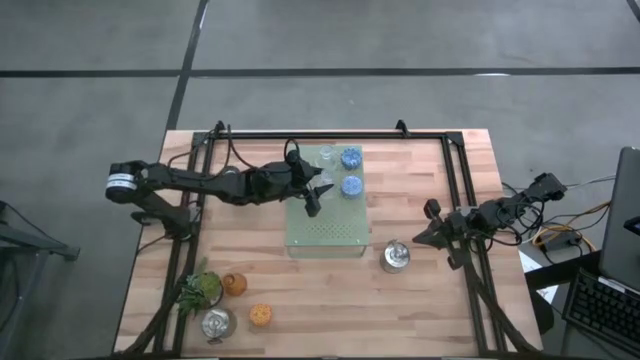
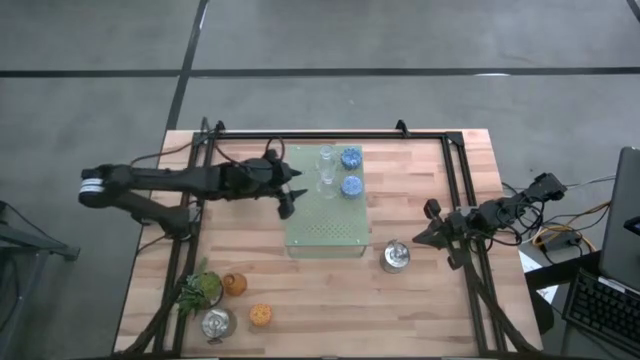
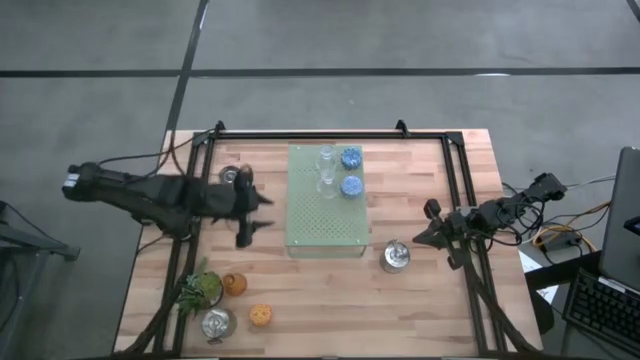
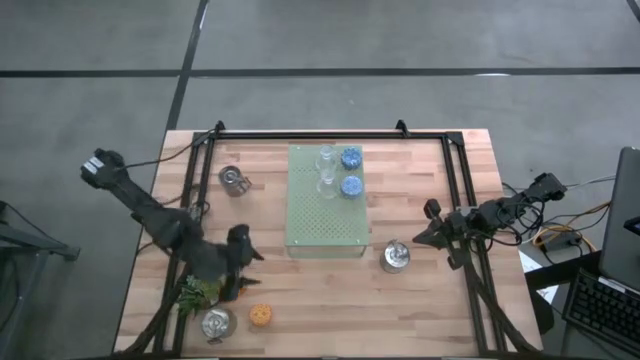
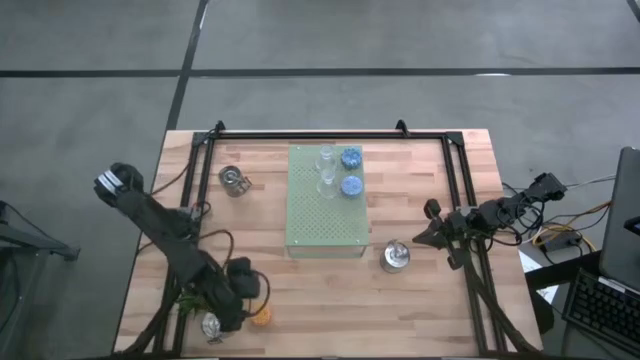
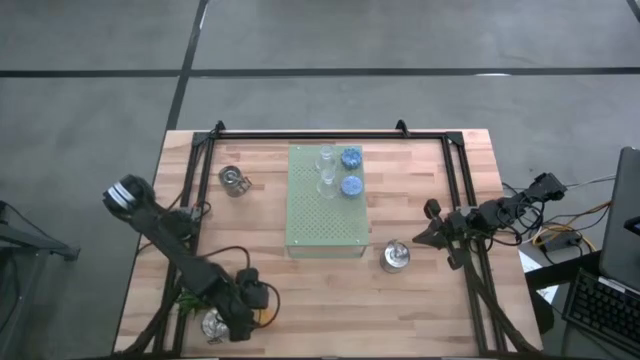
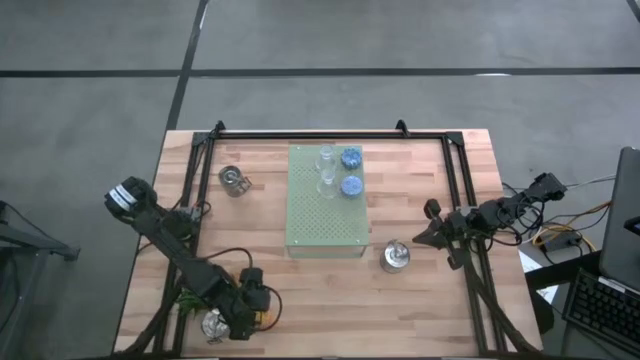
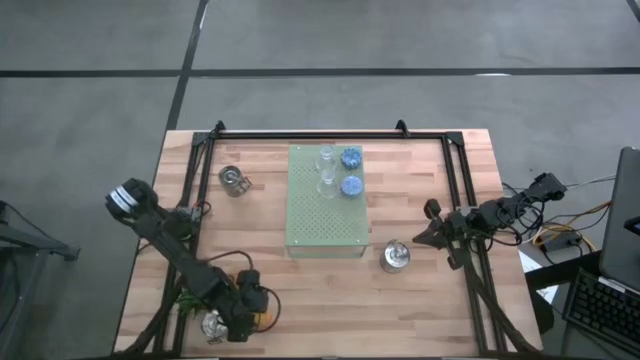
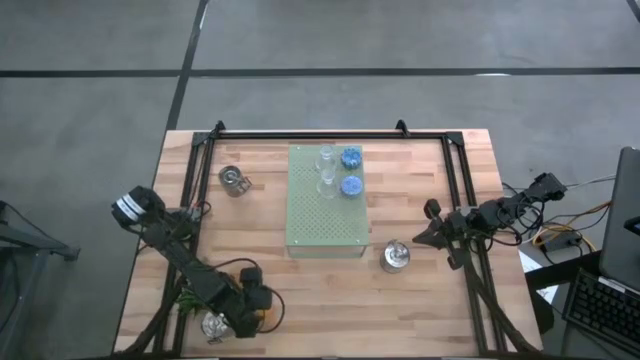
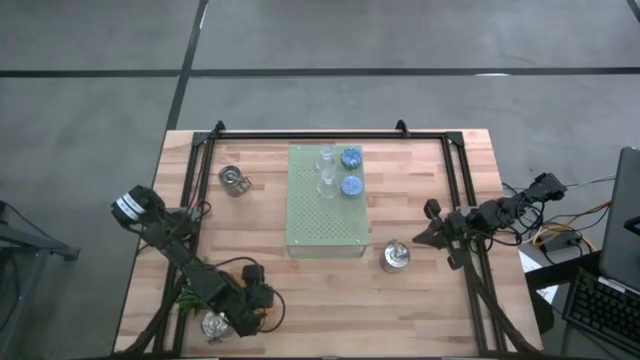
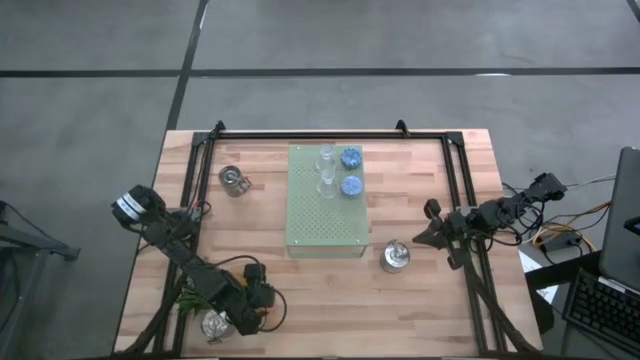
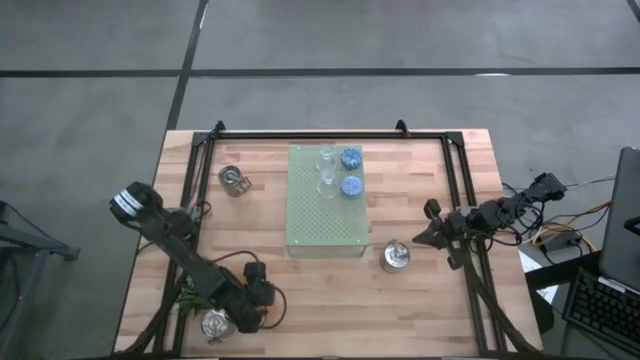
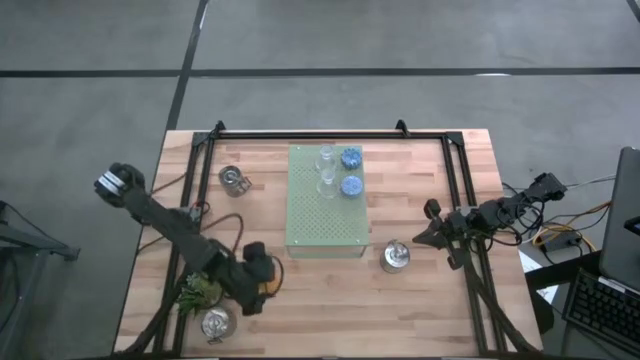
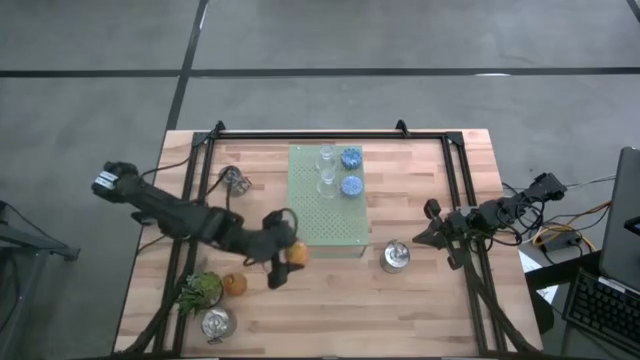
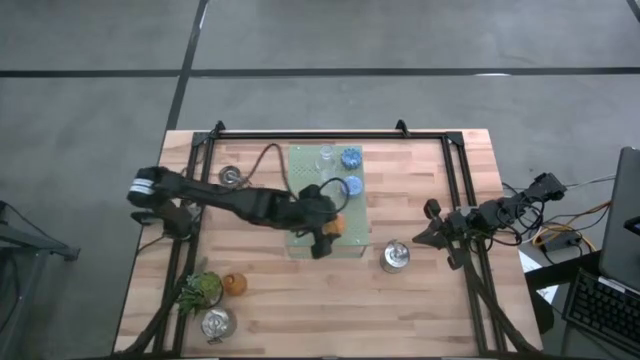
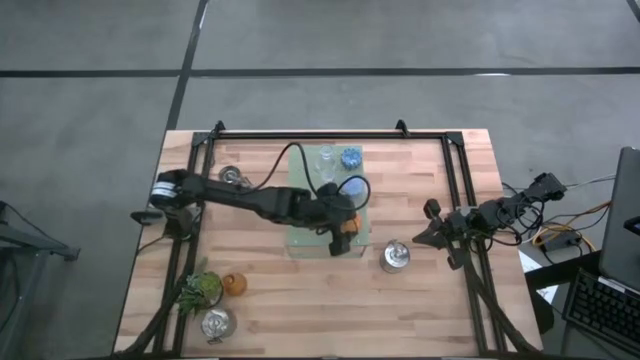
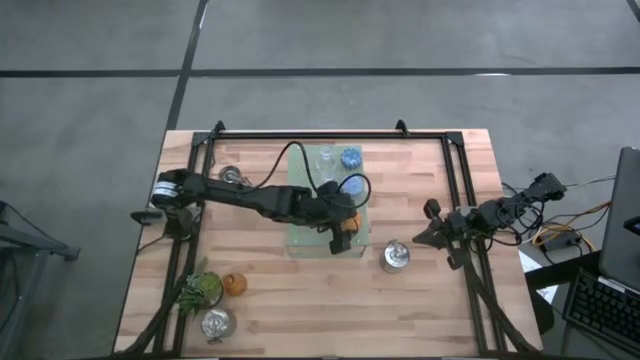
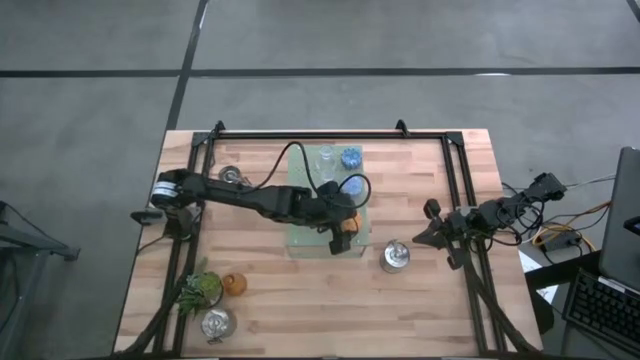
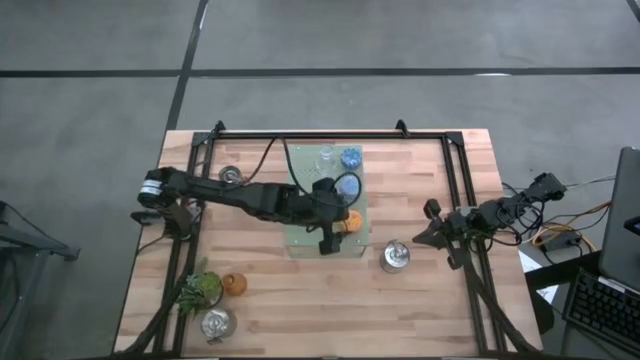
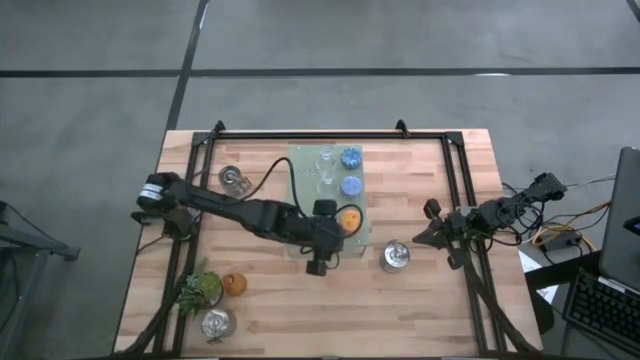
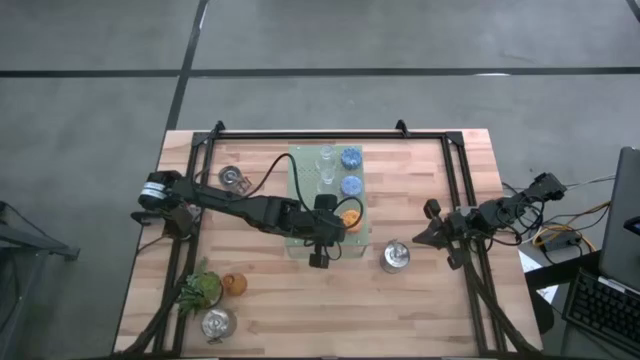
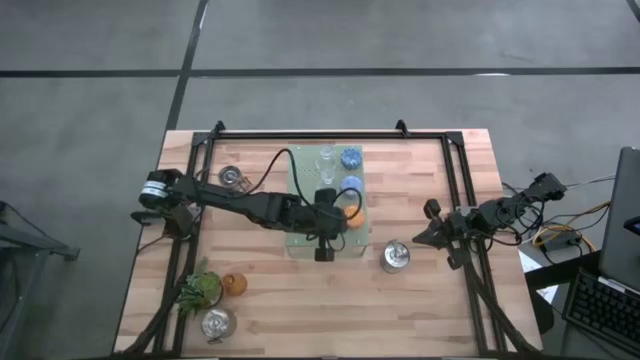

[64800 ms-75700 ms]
Task: Pick & Place candle stick holders
Put the yellow patterned scented candle on the shelf aligned with the other light blue scented candle

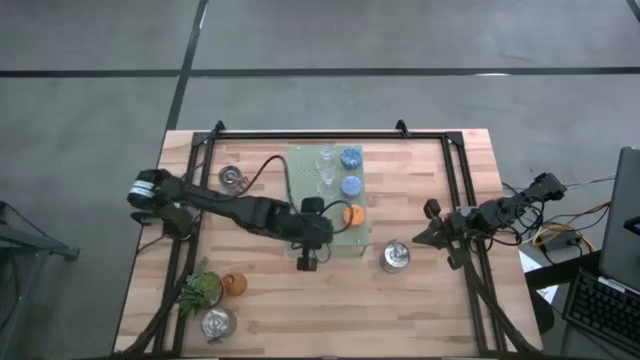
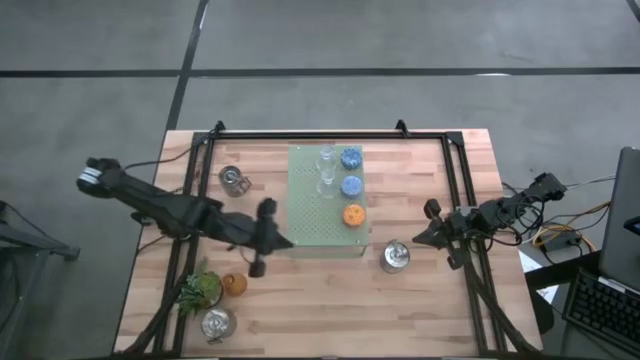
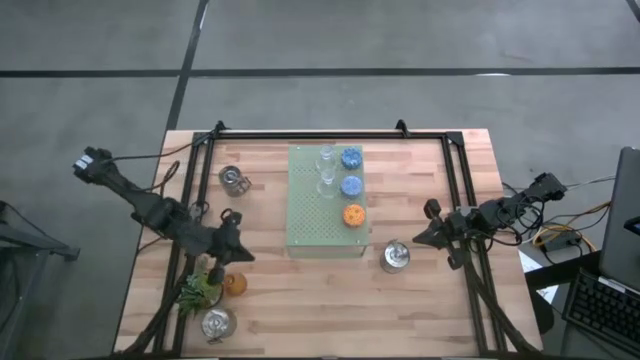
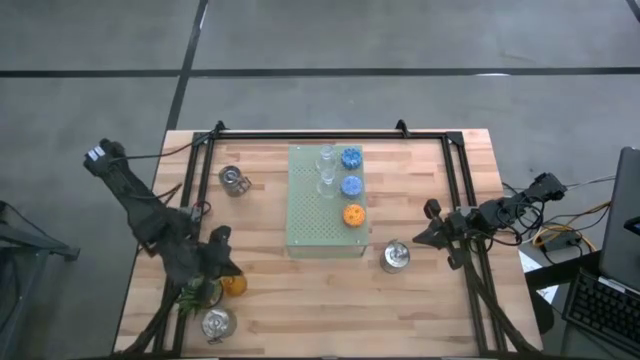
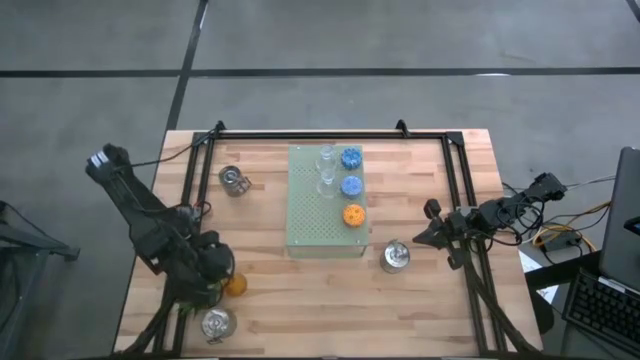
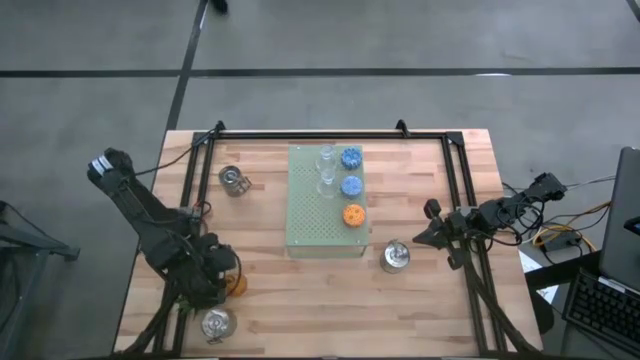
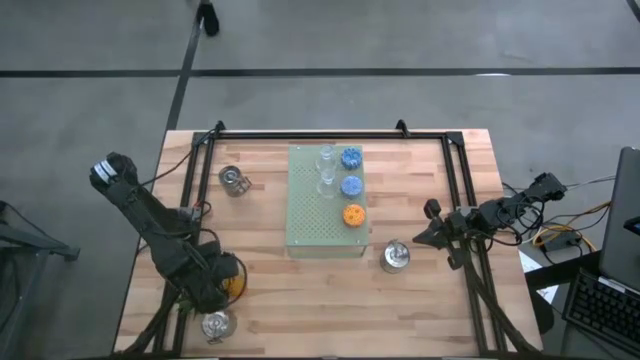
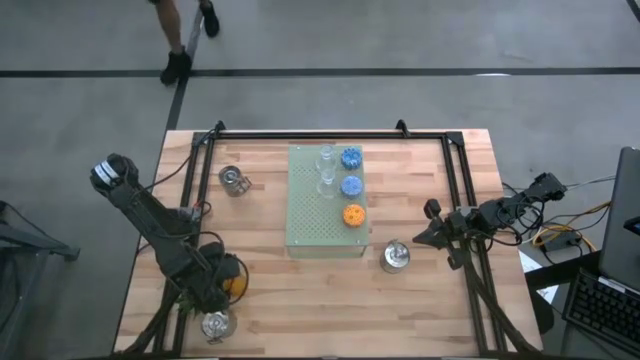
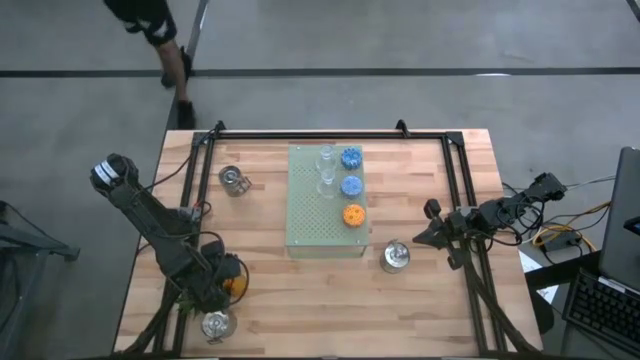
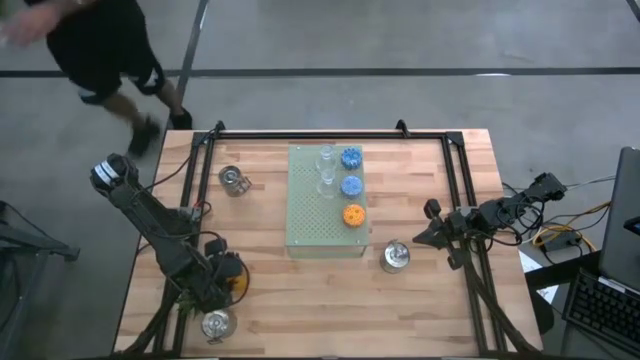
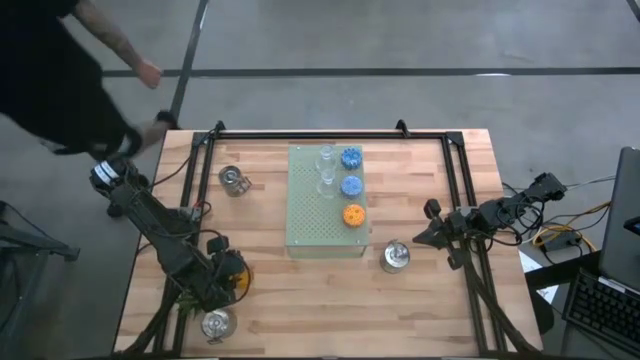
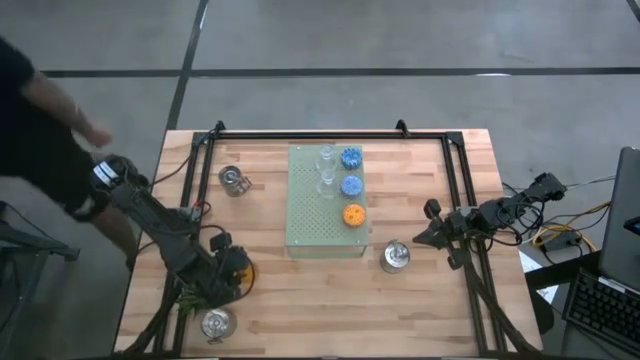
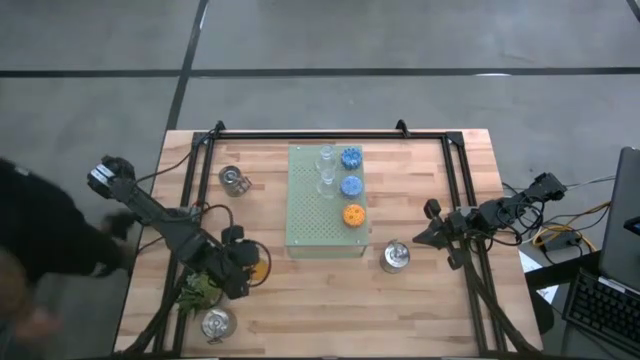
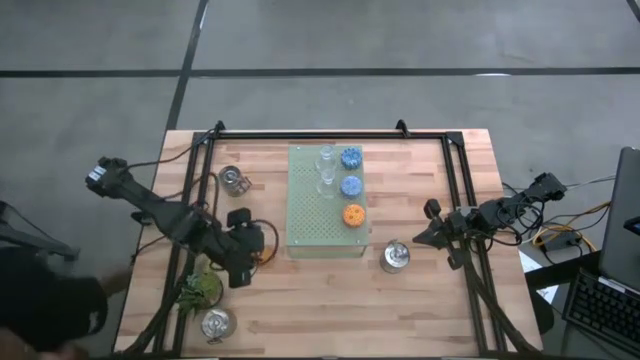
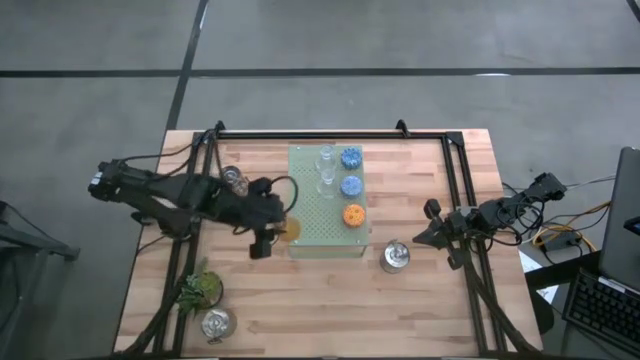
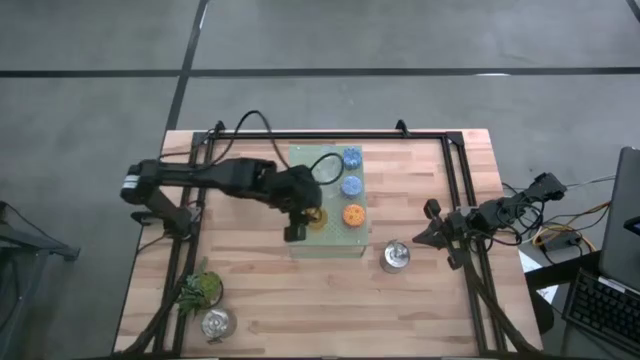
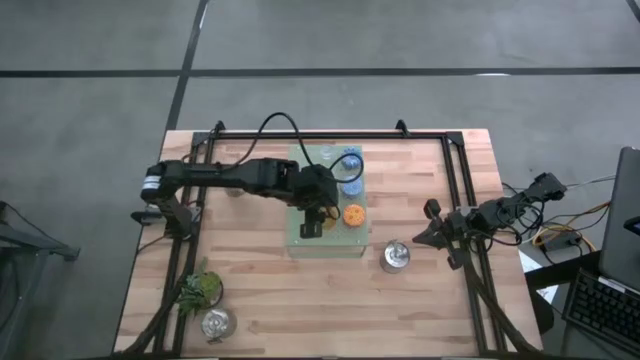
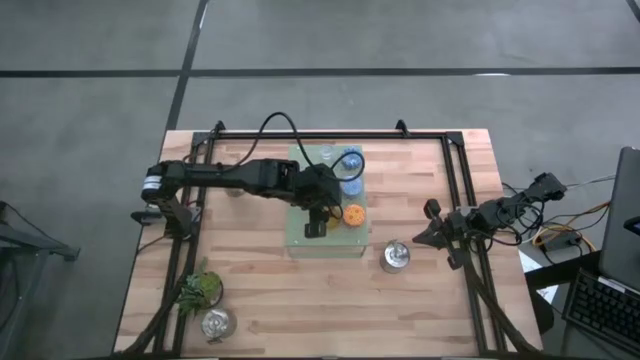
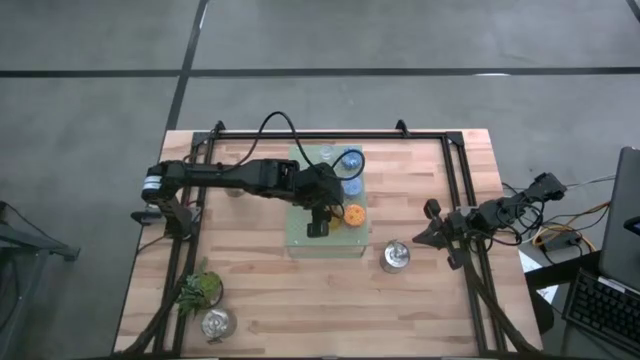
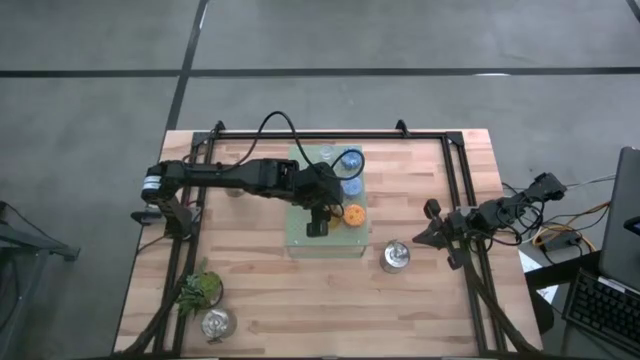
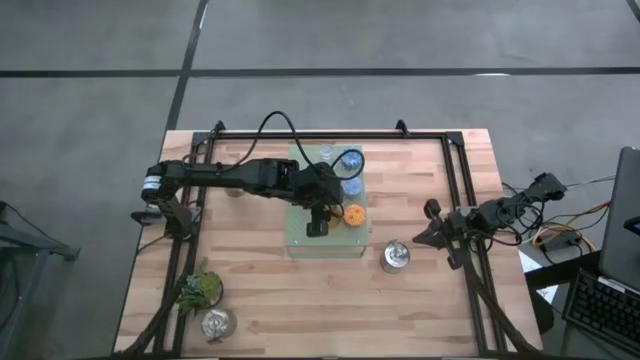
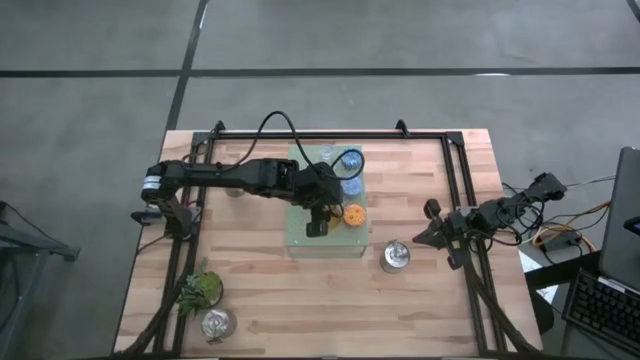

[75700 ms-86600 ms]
Put the orange candle holder on the shelf aligned with the other transparent candle holder
